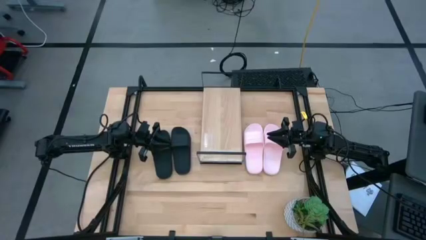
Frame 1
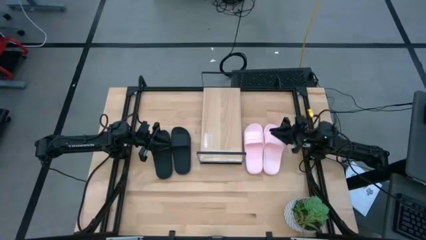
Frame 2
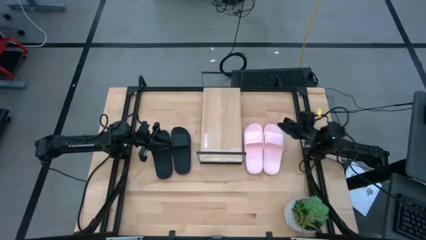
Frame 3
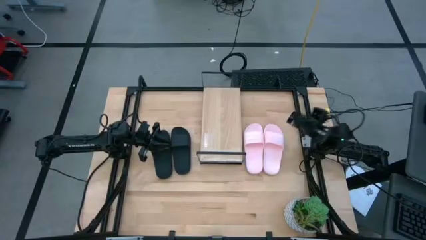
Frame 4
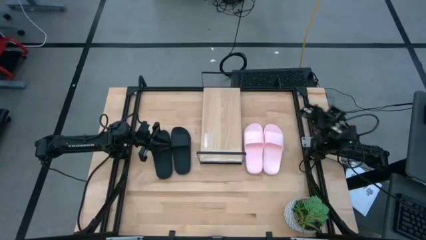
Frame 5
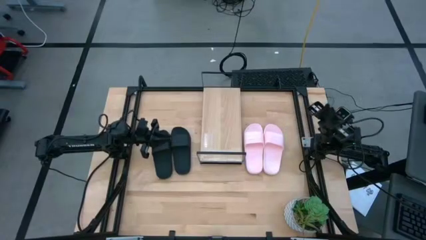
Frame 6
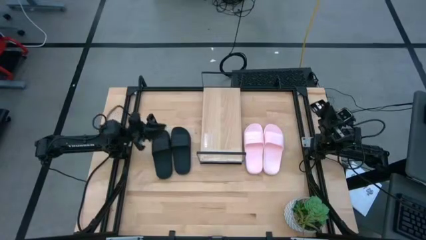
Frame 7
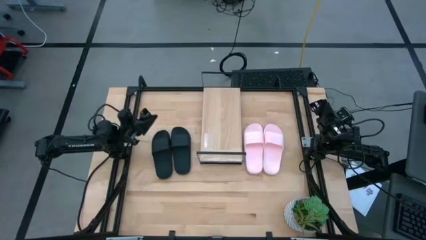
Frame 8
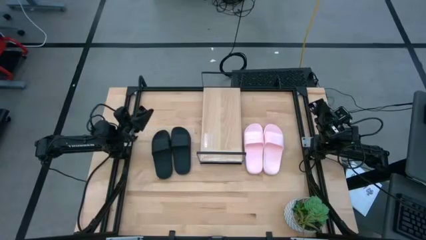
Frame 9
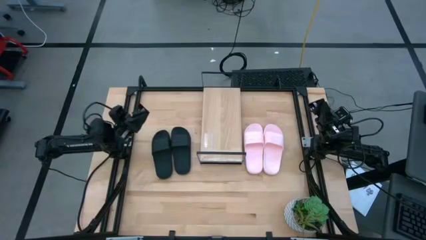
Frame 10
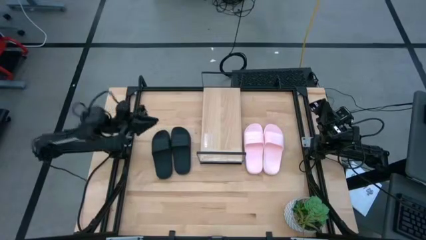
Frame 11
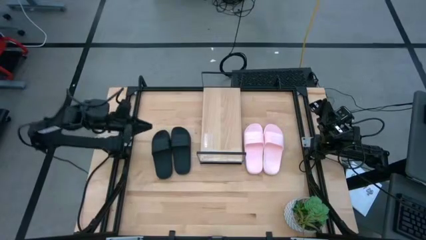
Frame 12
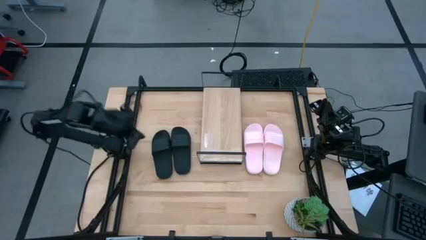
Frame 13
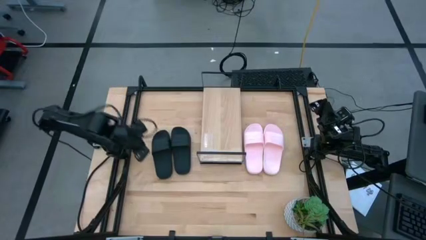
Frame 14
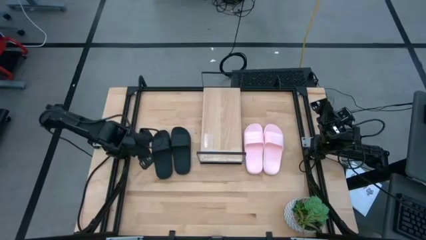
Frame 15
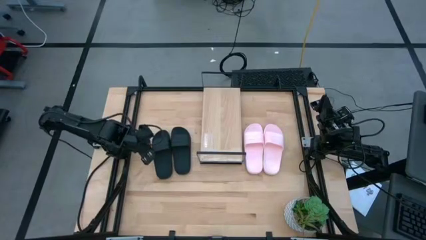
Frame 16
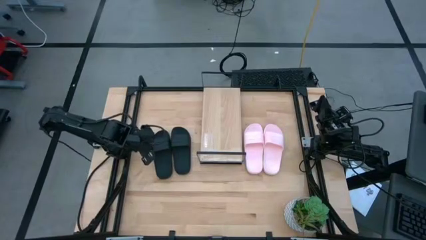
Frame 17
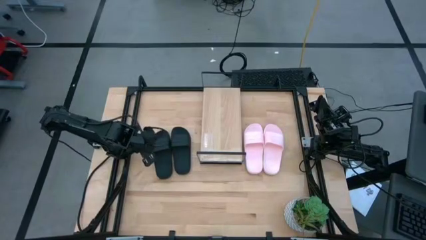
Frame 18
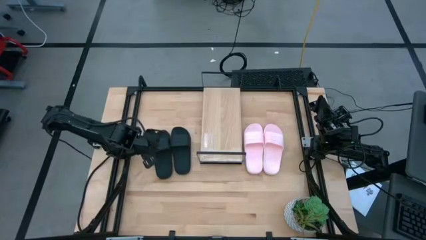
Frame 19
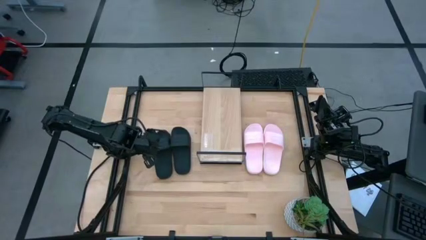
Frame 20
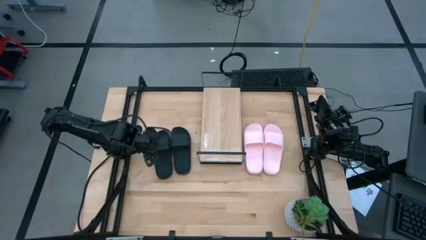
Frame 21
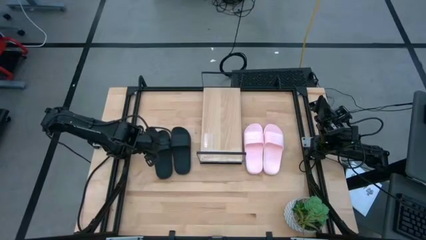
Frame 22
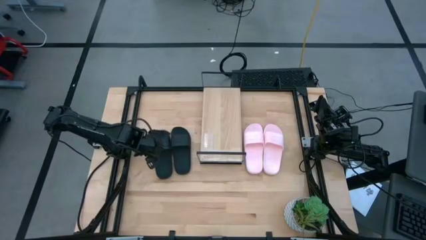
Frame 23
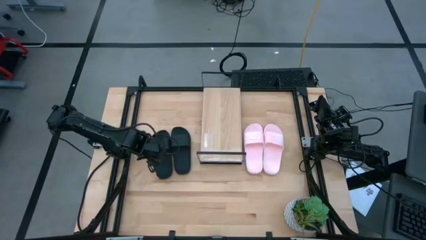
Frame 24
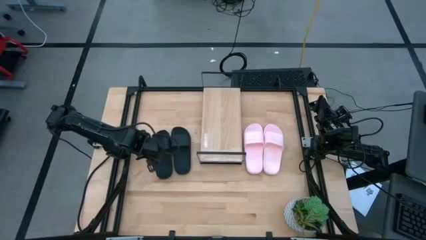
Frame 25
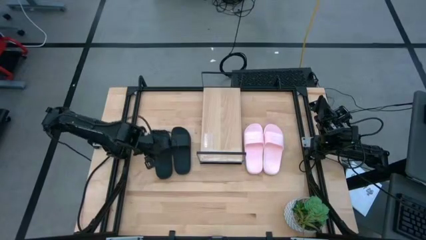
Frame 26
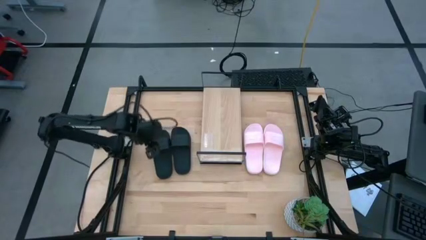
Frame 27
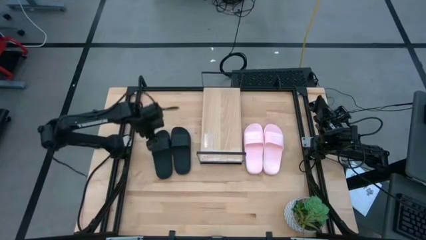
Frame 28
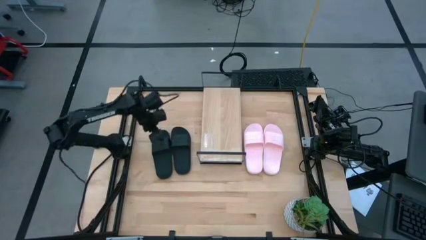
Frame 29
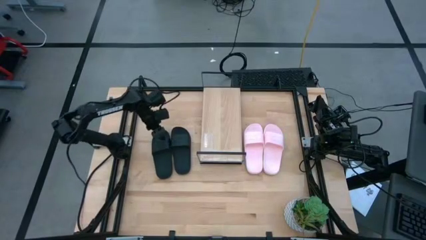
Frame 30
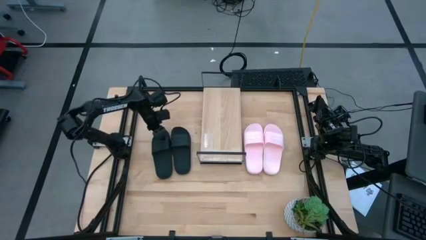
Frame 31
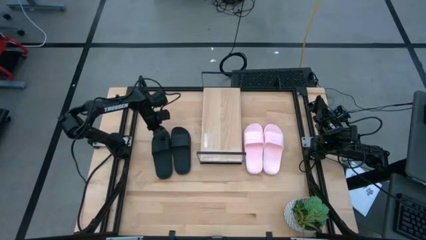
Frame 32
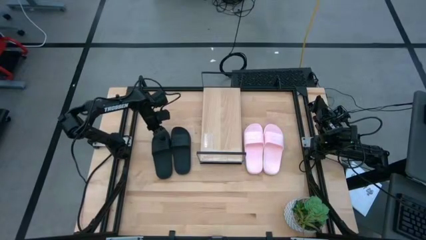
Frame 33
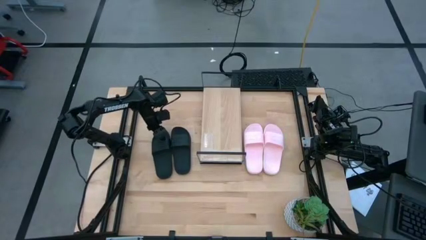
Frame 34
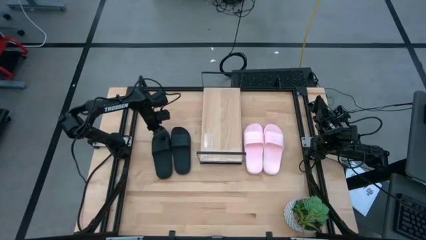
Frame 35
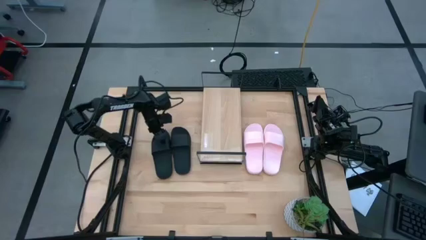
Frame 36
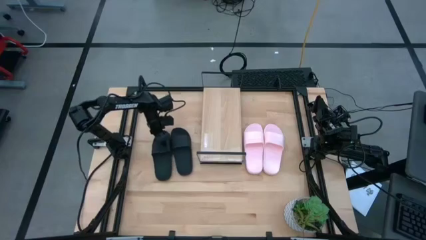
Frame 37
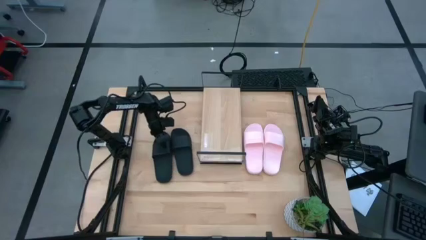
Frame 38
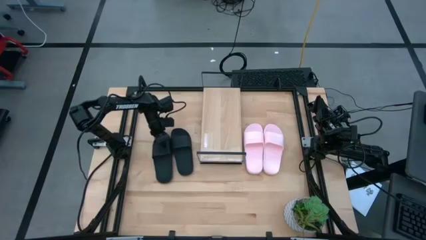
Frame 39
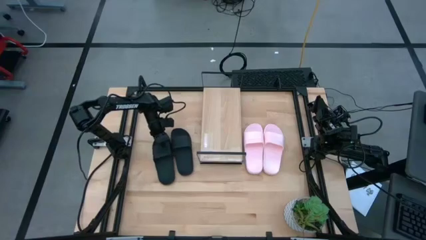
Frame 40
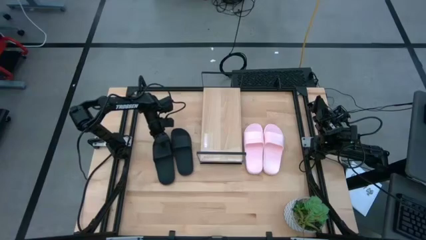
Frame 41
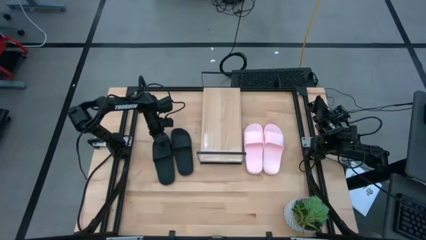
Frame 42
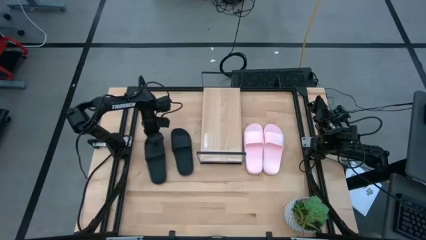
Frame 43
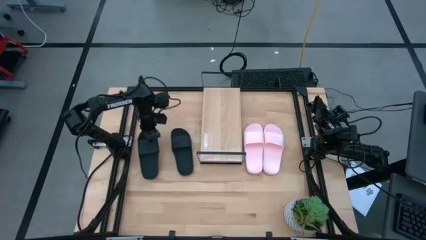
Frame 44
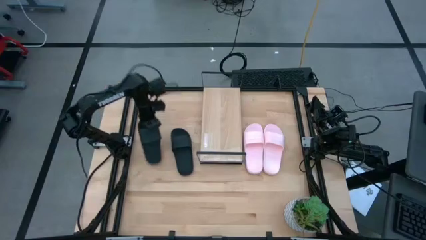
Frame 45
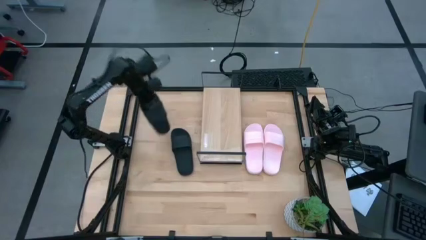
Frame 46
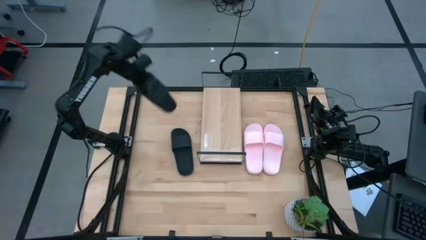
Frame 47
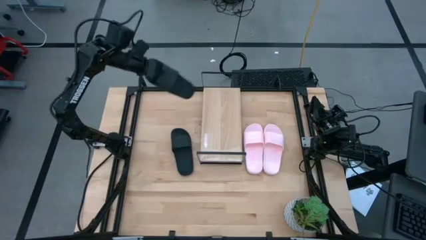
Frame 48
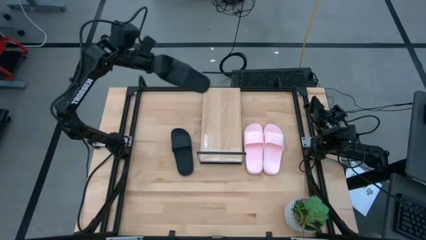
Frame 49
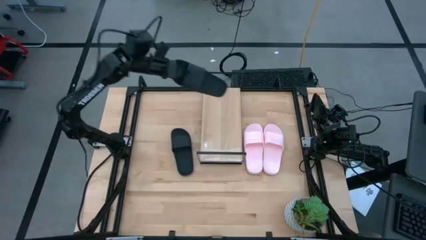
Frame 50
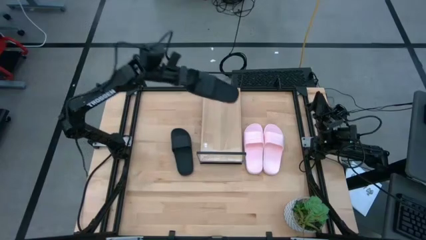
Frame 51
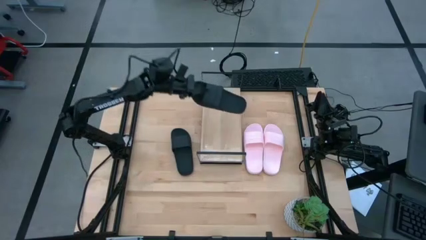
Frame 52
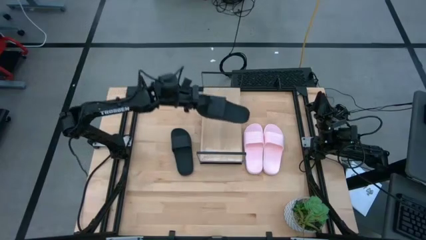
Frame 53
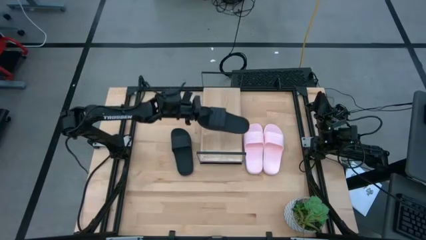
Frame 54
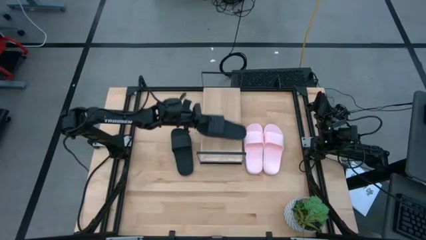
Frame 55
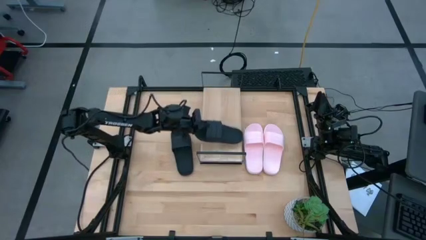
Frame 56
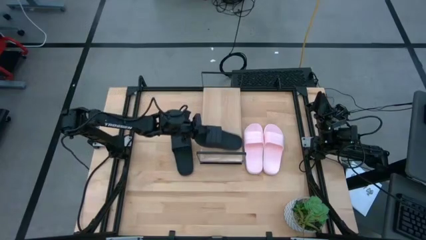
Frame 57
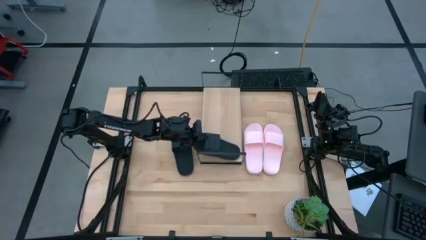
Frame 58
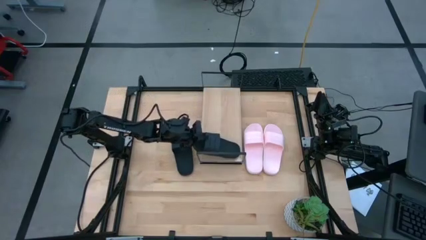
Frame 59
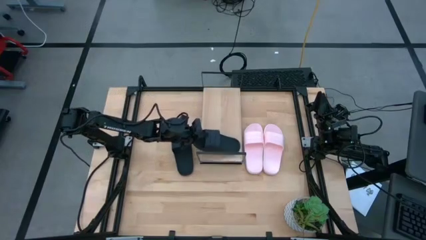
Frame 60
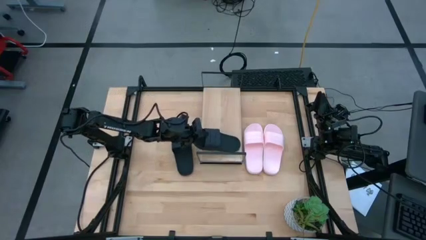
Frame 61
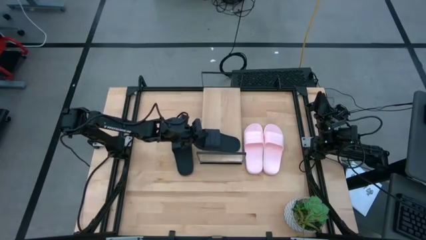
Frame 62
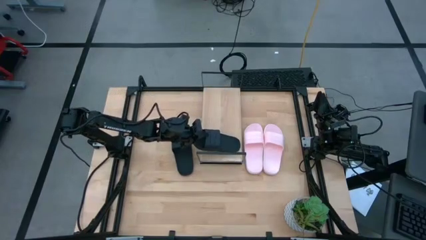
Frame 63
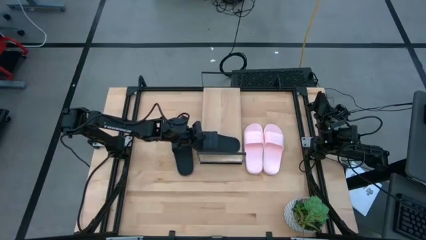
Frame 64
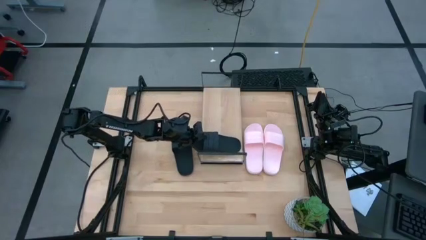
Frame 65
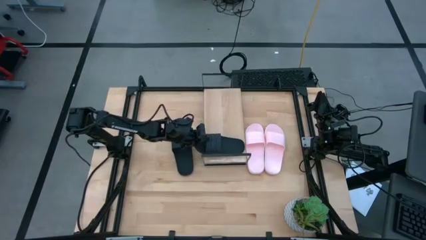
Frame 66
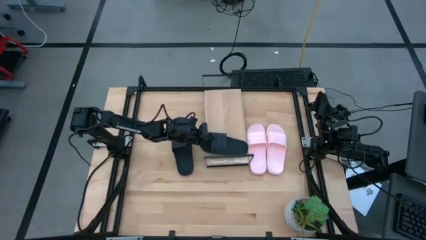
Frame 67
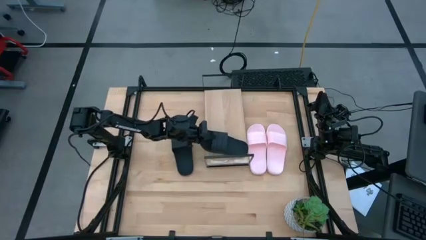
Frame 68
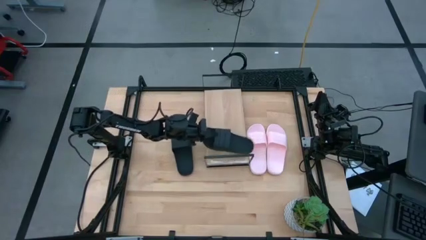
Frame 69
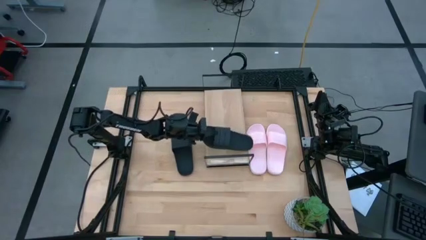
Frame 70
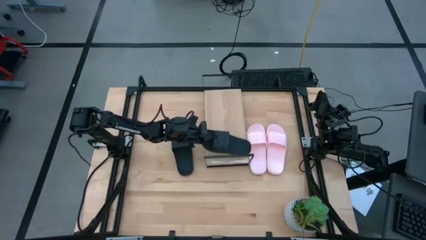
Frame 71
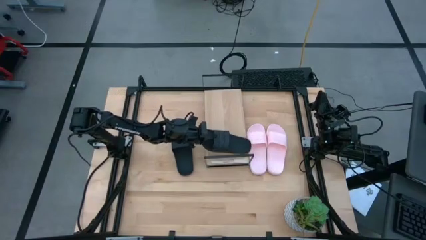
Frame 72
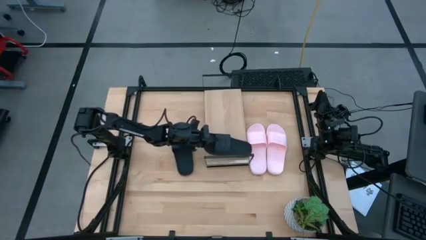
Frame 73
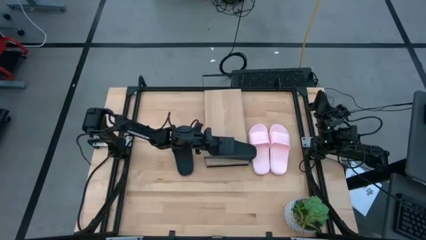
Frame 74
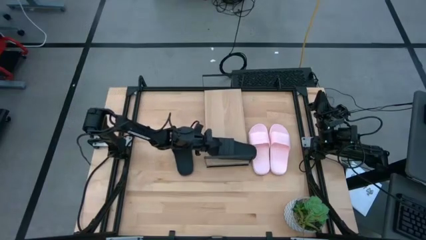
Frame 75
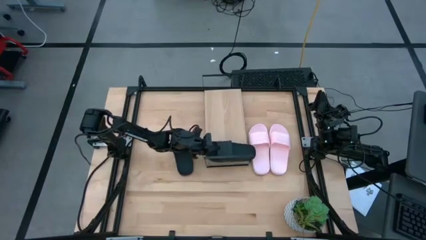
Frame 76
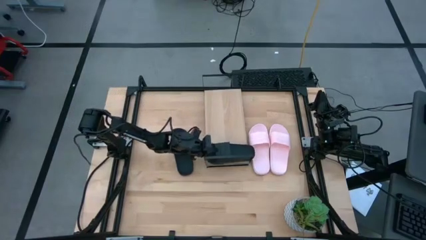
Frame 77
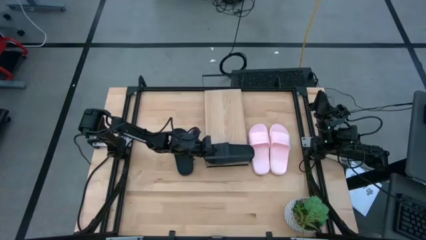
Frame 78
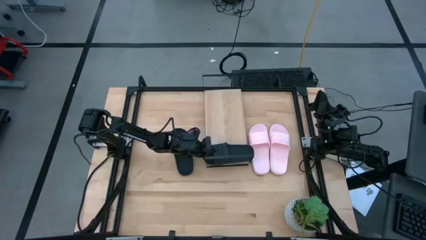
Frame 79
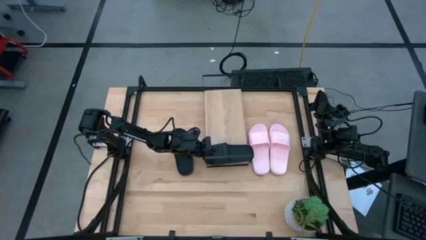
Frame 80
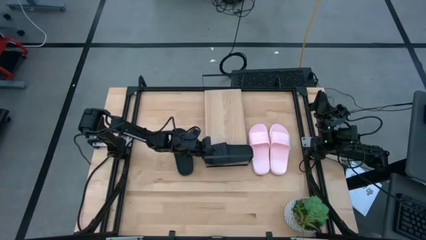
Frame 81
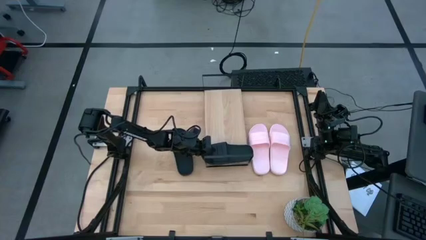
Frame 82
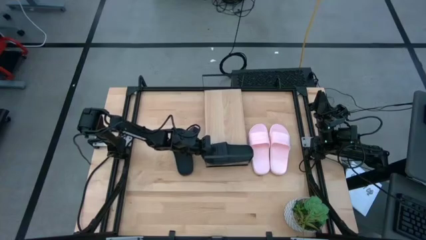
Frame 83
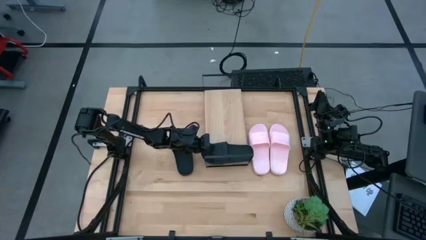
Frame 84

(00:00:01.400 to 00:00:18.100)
Task: Pick and place slides into the shelf
Put the left black slide on the shelf
